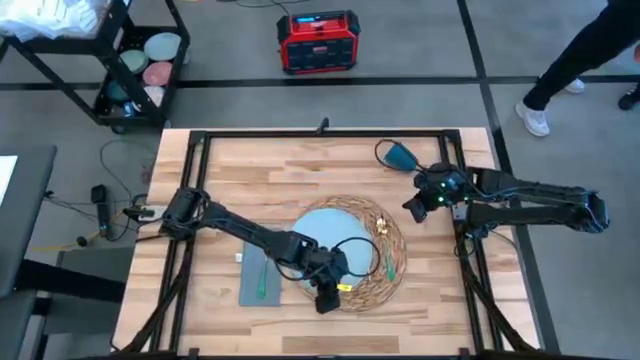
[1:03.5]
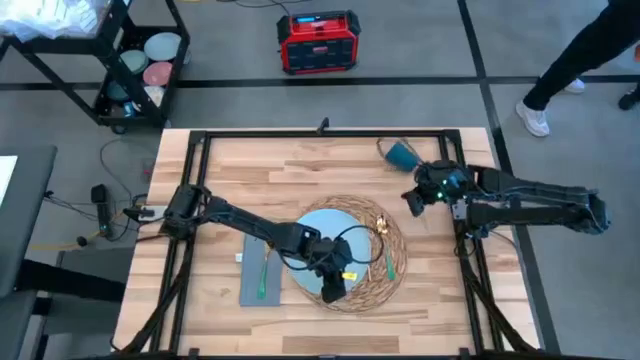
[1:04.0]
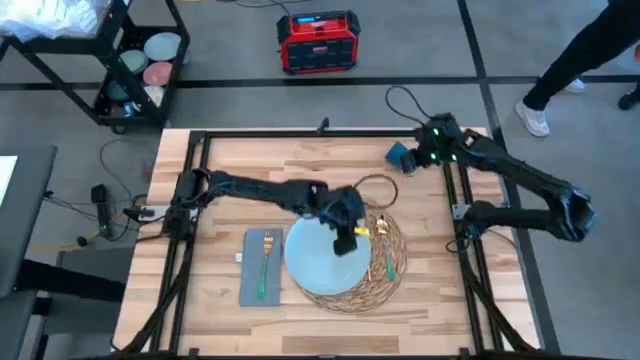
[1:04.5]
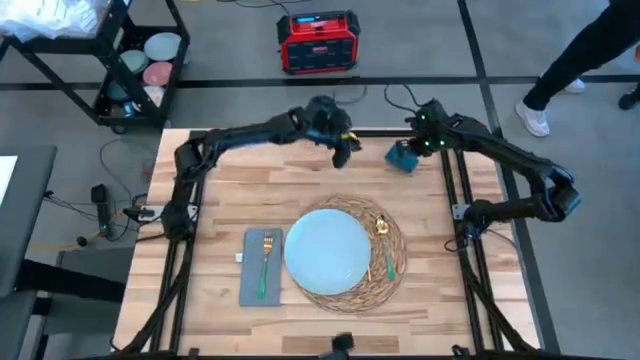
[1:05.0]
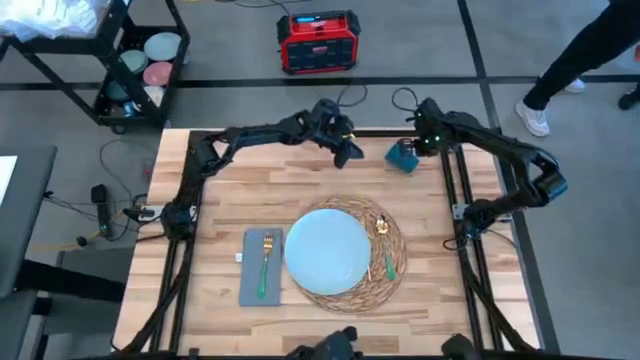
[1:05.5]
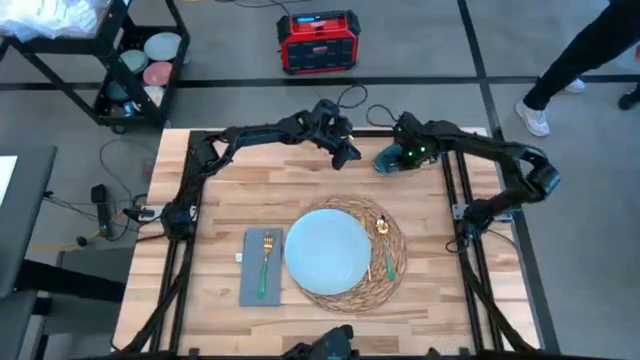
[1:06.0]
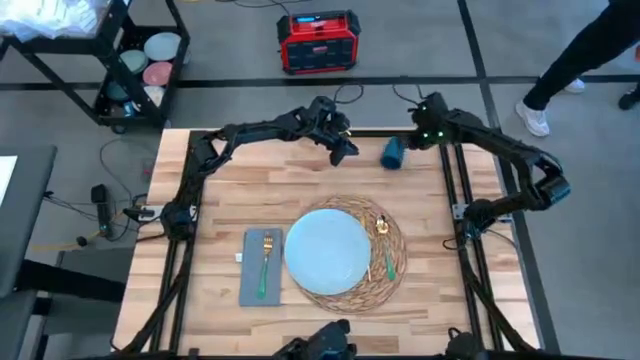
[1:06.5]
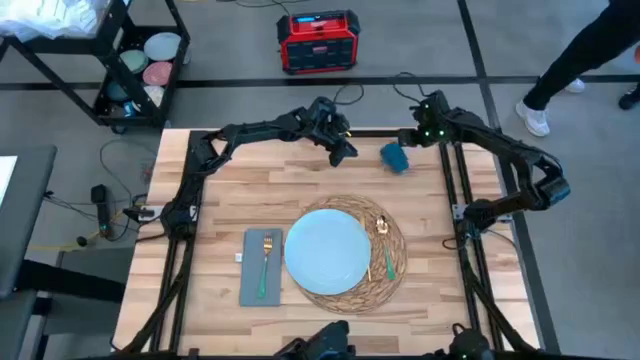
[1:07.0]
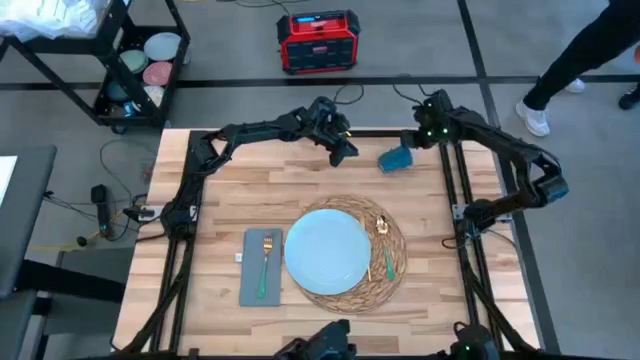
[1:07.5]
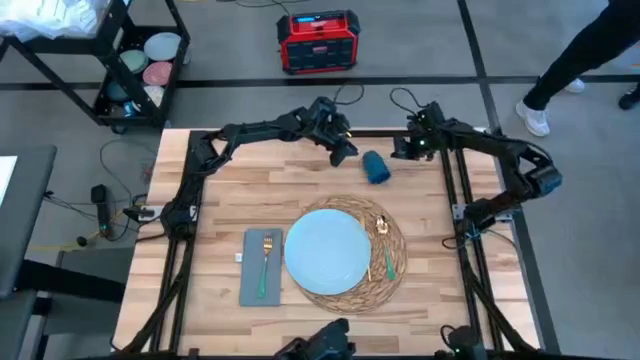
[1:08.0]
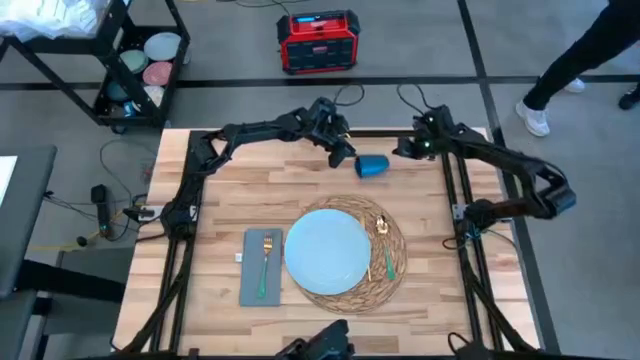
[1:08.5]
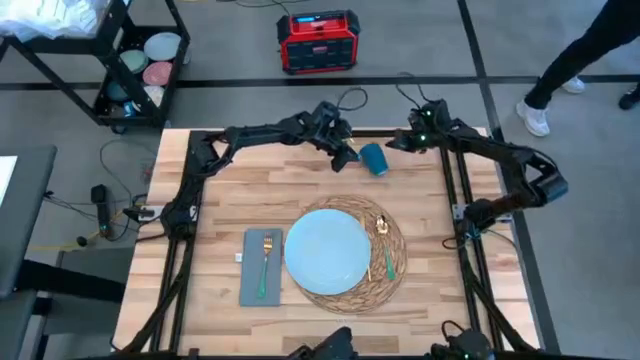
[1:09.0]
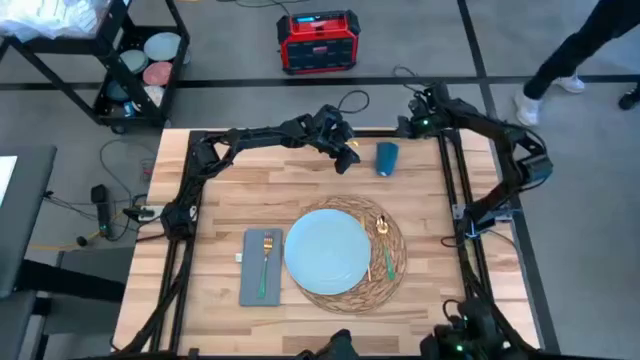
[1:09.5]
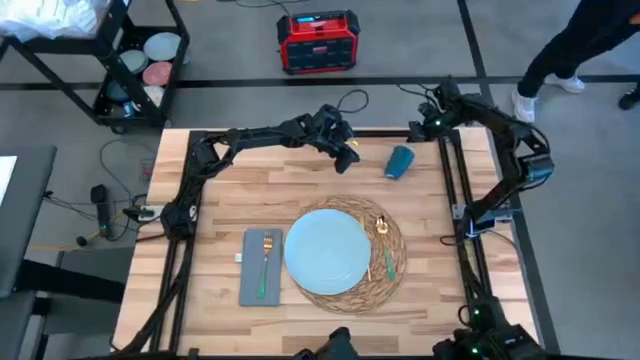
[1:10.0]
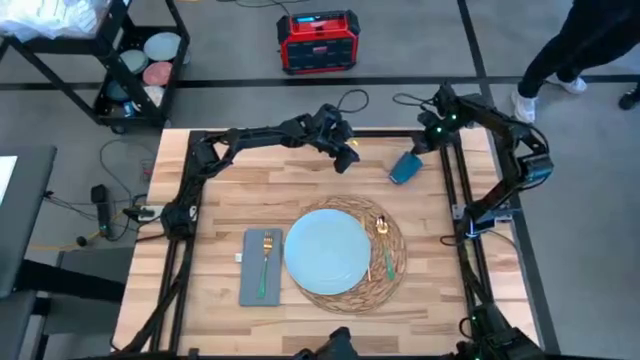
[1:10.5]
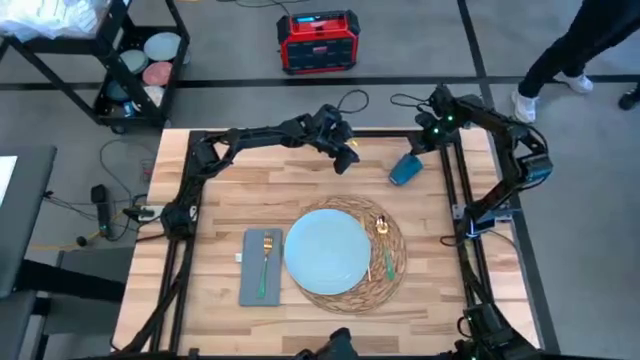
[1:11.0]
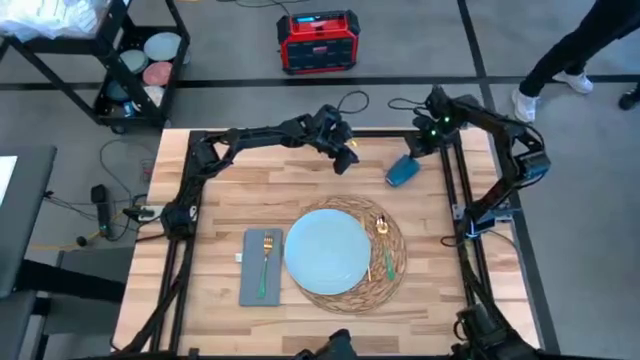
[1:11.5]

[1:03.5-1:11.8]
Task: Set table place
Move the blue plastic cup to the top of the brown woven placemat

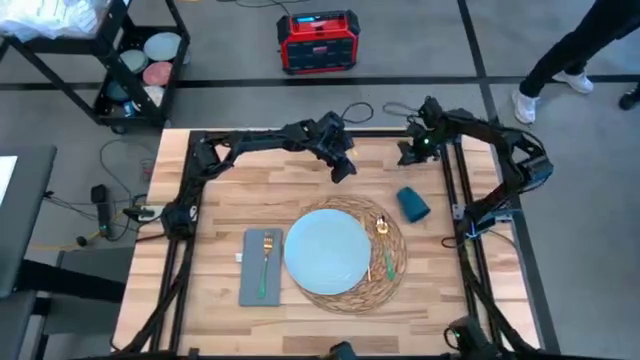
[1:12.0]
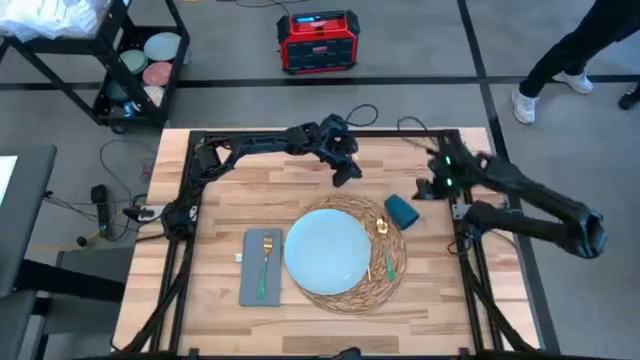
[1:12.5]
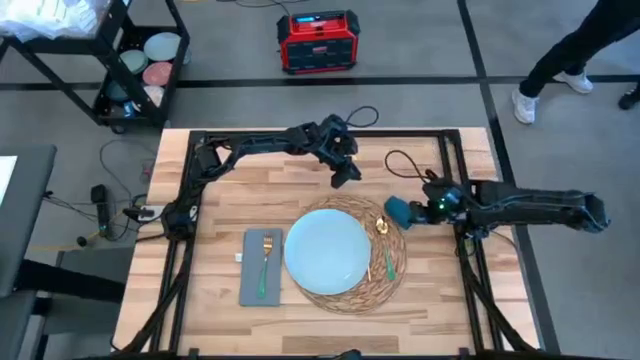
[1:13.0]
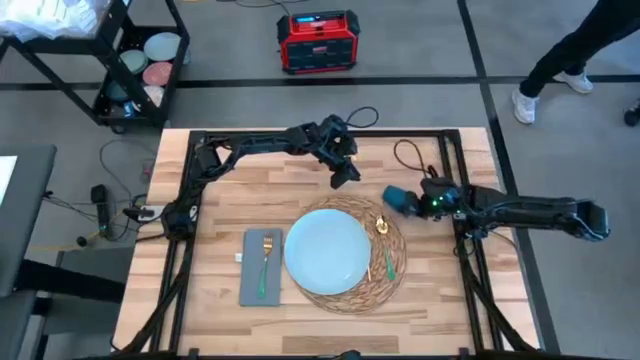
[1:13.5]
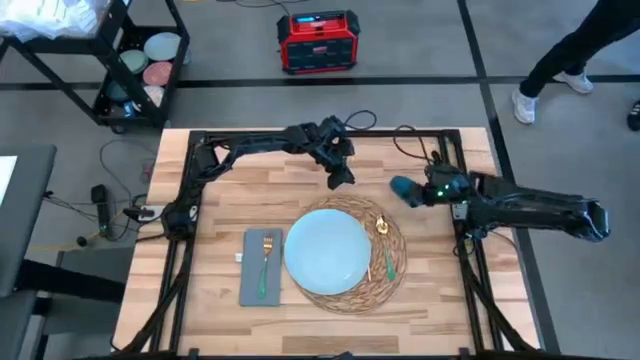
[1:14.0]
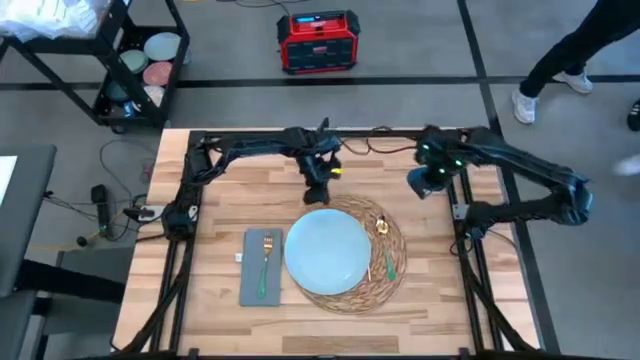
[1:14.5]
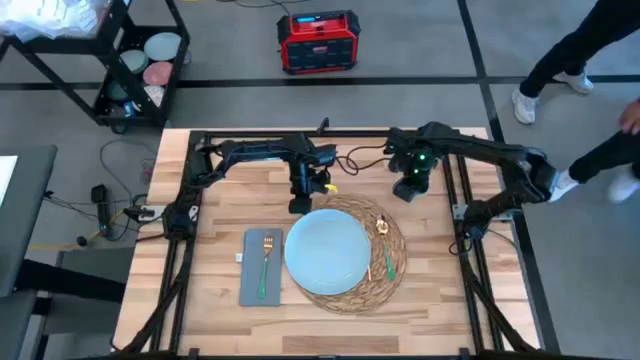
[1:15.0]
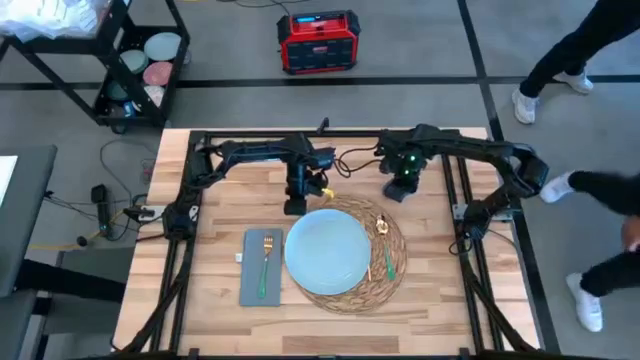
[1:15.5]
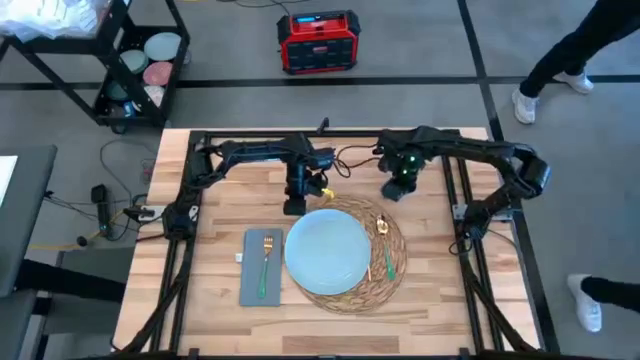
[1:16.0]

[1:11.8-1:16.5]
Move the blue plastic cup to the top of the brown woven placemat

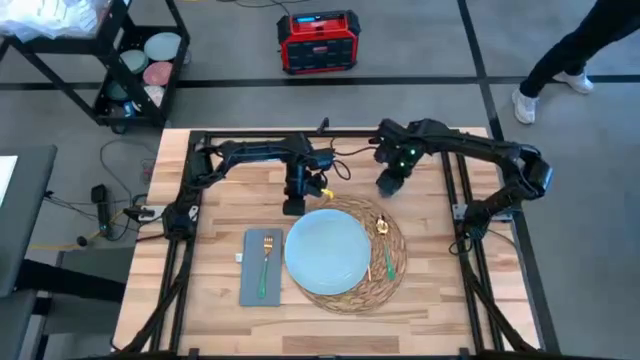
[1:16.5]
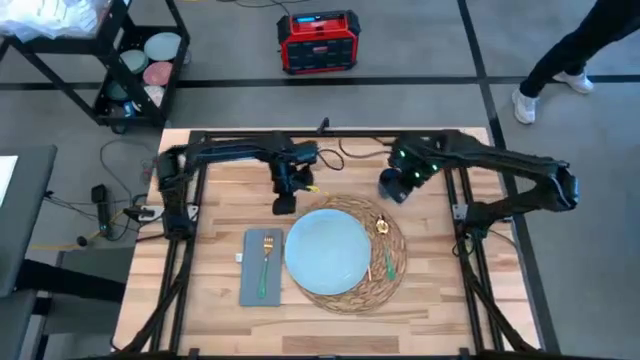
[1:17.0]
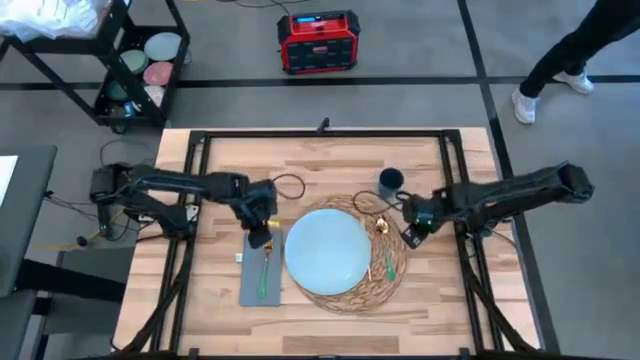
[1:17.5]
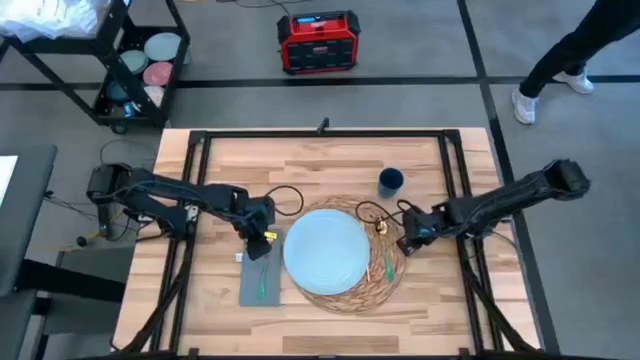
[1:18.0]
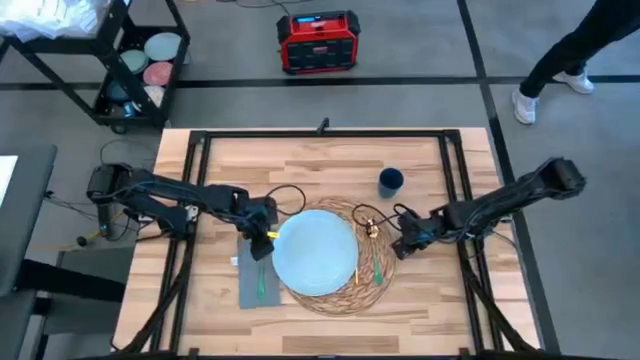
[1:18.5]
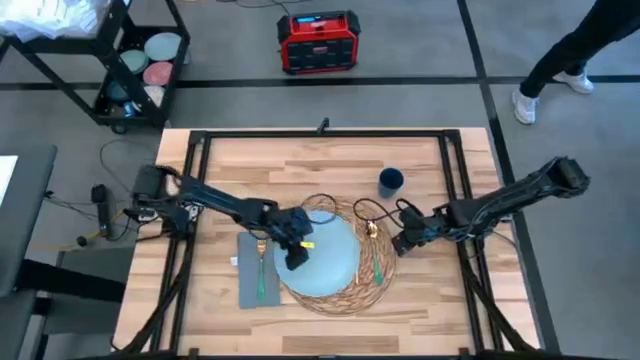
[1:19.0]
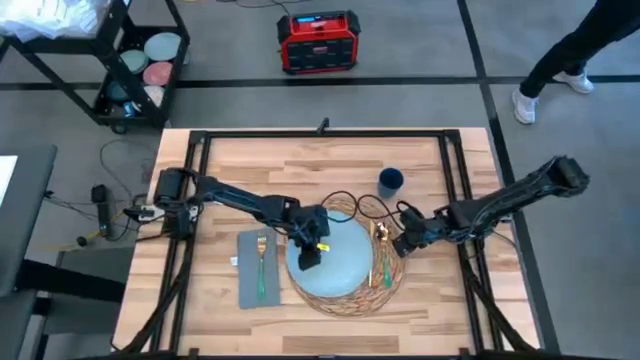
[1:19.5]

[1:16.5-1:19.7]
Adjust the brown woven placemat

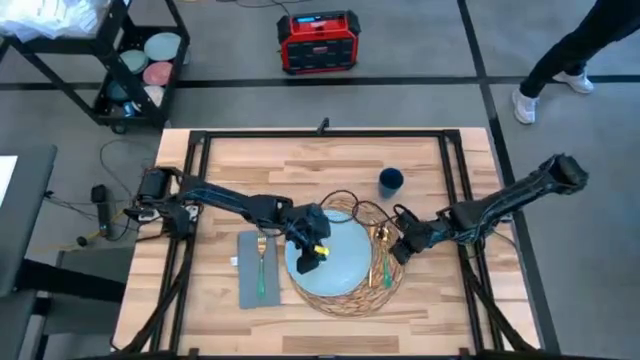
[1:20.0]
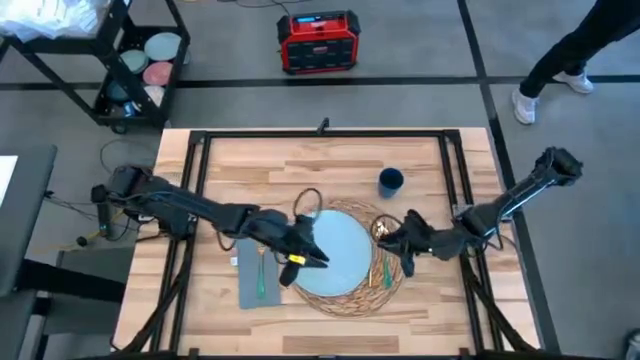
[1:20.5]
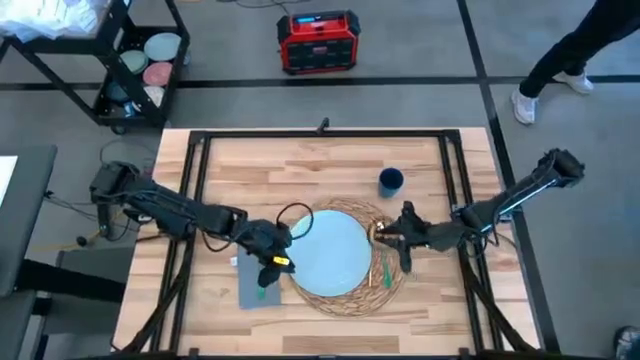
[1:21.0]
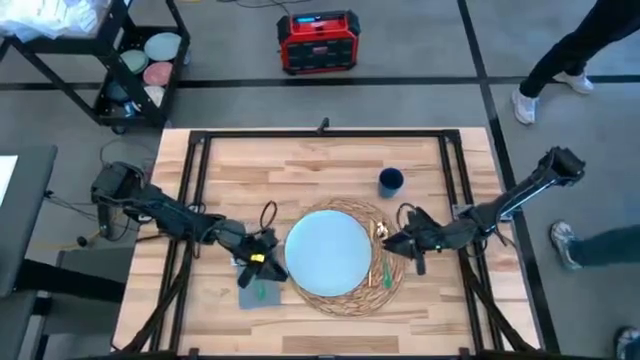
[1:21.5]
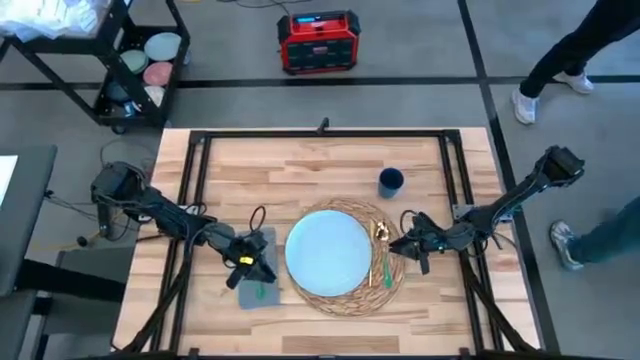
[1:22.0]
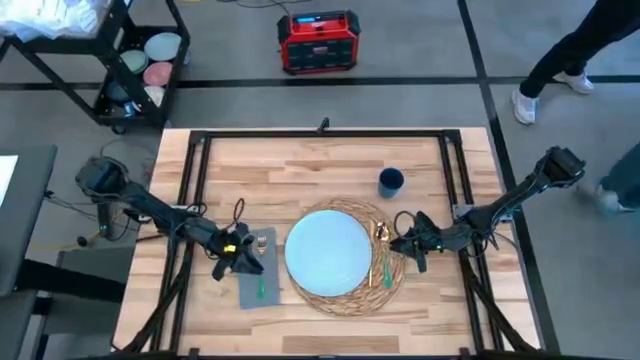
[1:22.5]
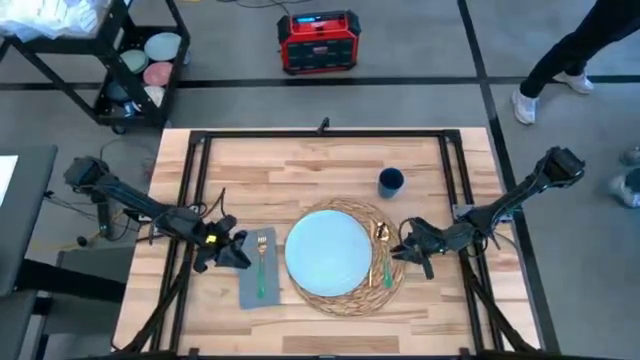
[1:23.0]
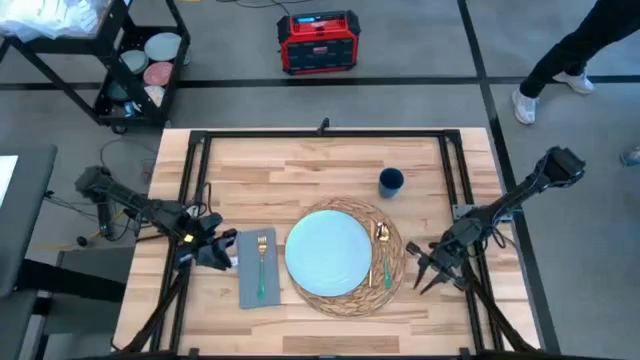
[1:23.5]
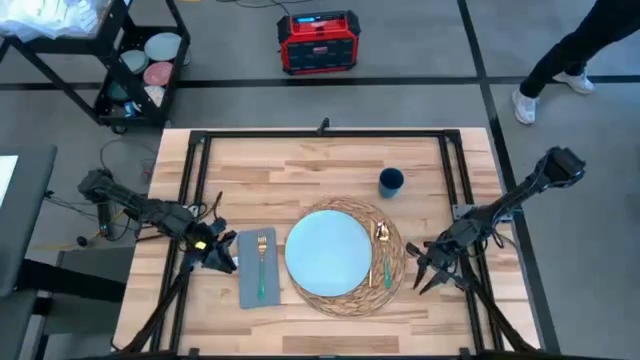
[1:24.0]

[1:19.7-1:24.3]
Return to Home Position

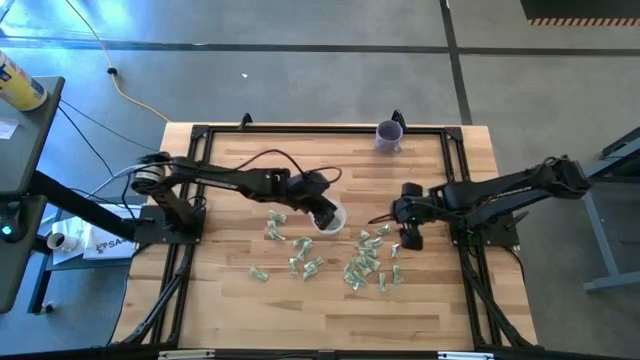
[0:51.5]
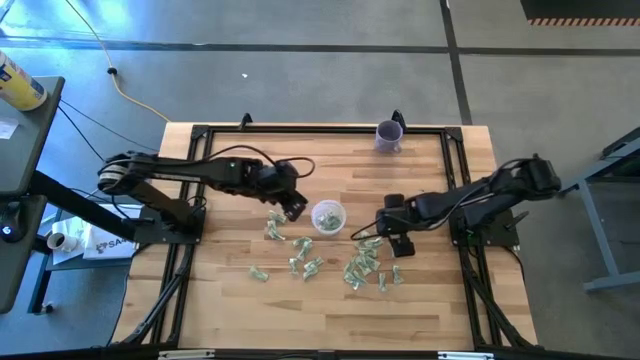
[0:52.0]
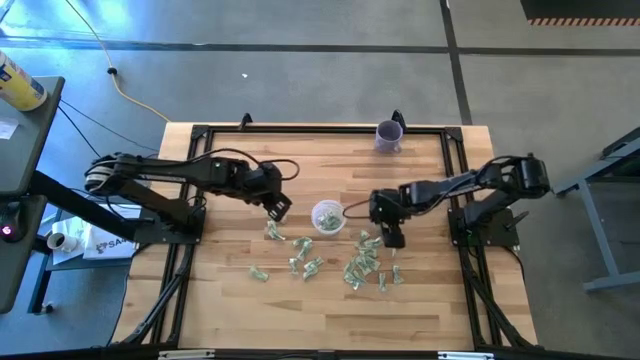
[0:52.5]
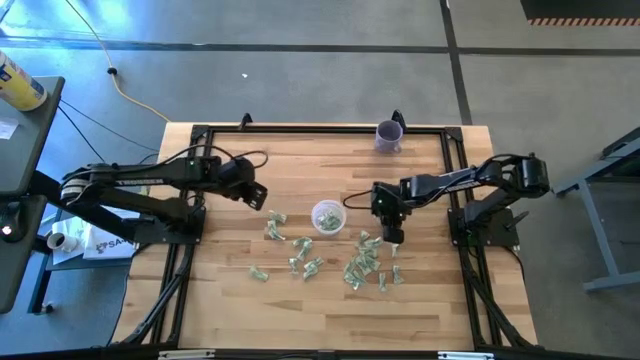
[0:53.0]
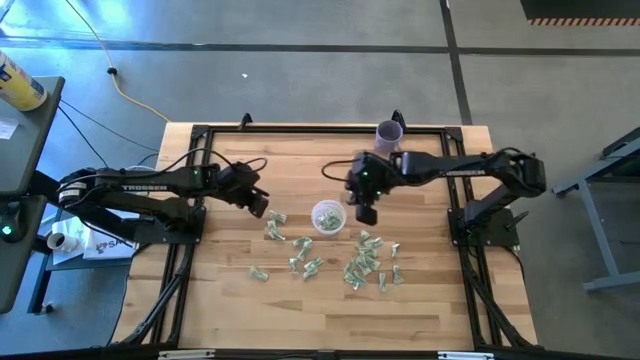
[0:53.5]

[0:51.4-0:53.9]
Task: Pick and place Stevia / Truvia into bins
Put the green stevia packet into the transparent bin
